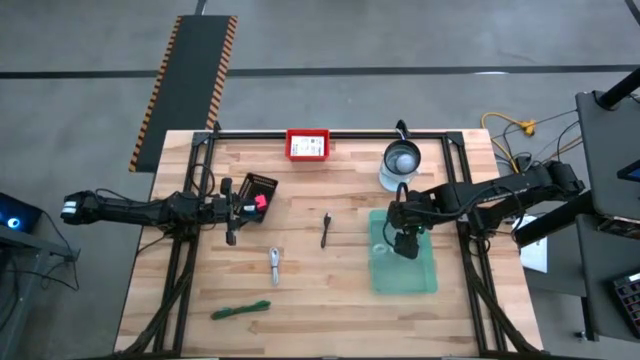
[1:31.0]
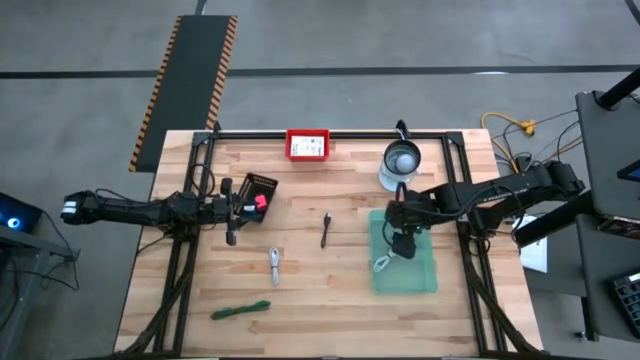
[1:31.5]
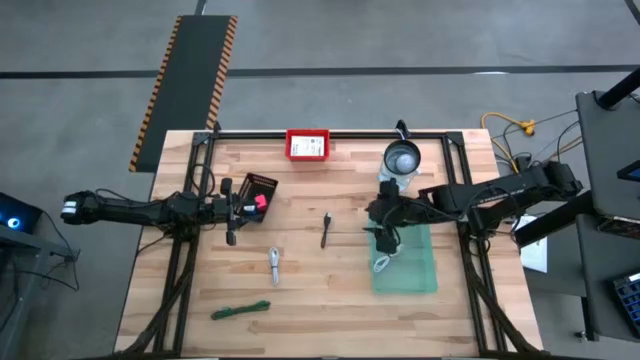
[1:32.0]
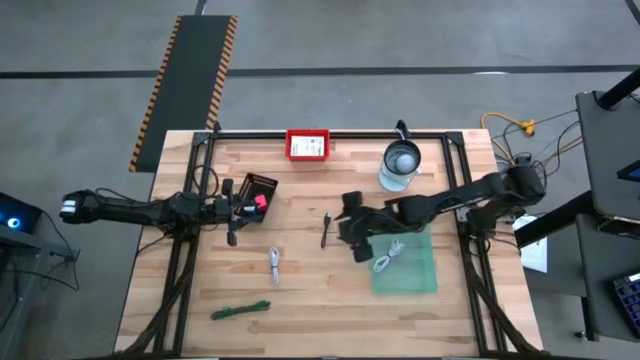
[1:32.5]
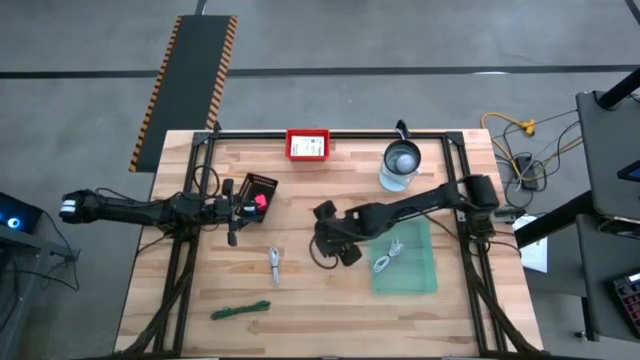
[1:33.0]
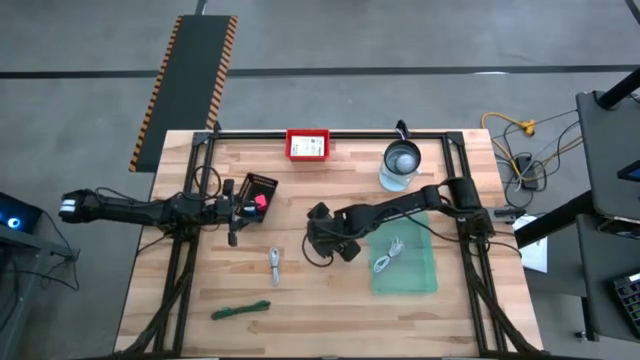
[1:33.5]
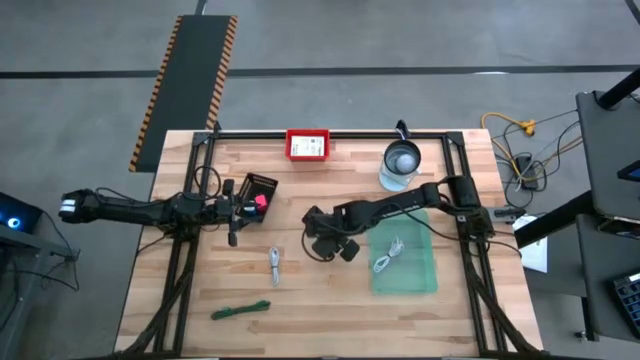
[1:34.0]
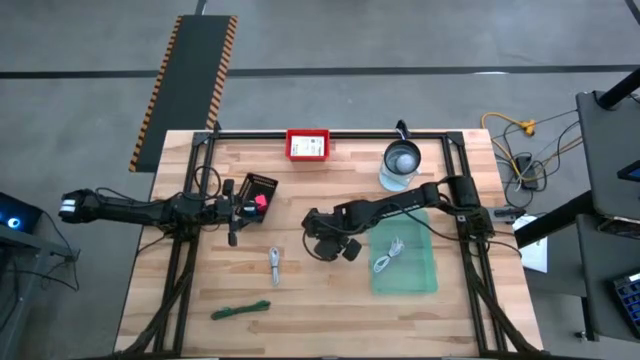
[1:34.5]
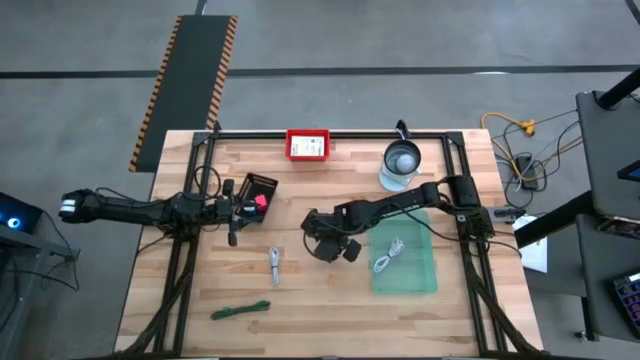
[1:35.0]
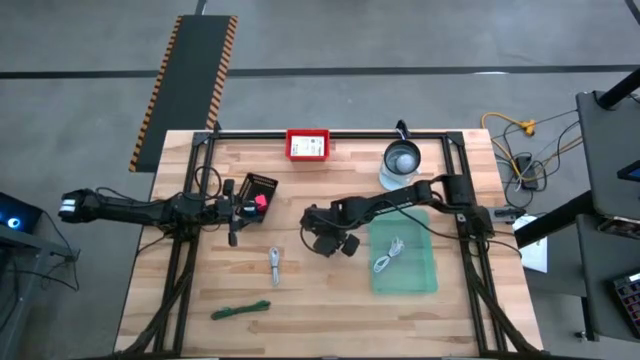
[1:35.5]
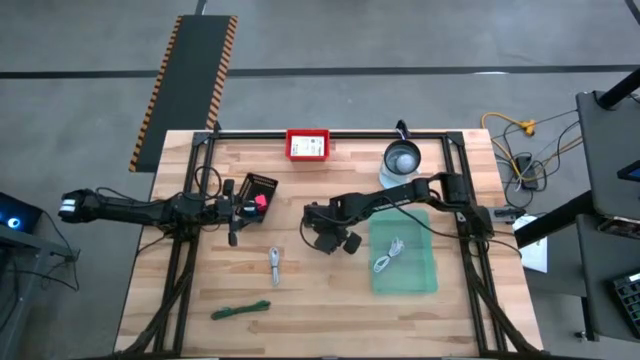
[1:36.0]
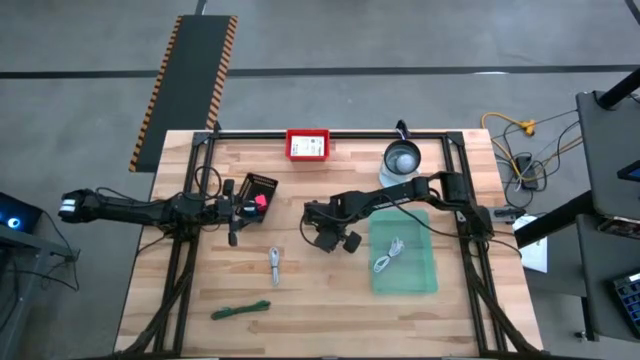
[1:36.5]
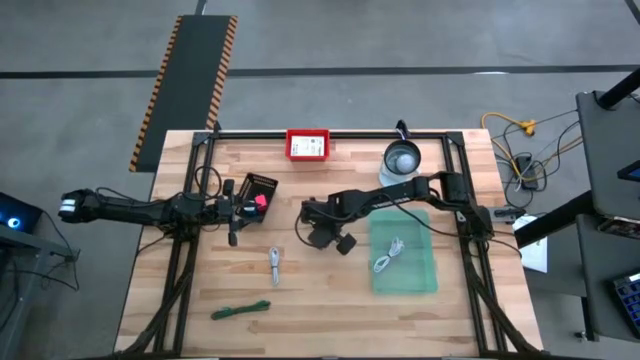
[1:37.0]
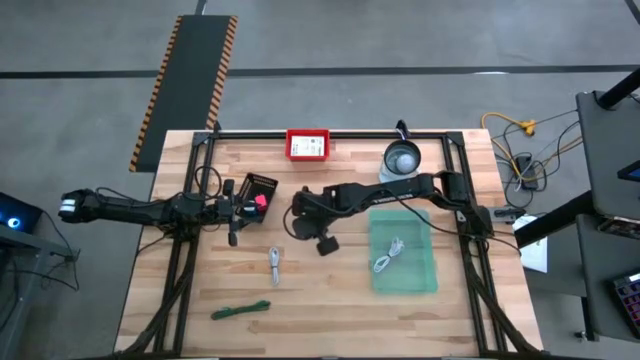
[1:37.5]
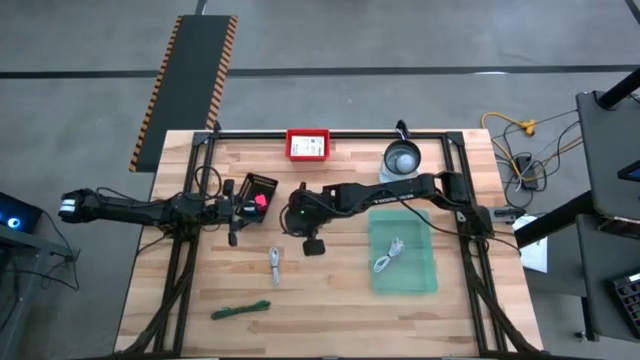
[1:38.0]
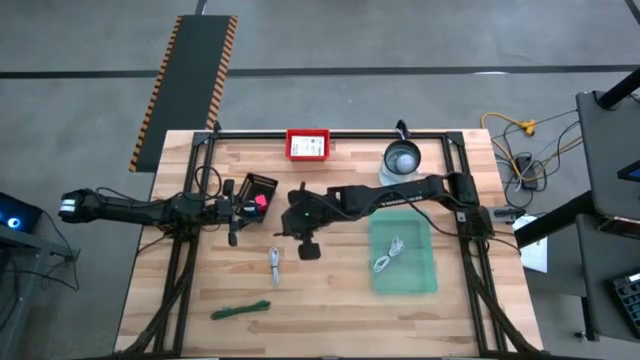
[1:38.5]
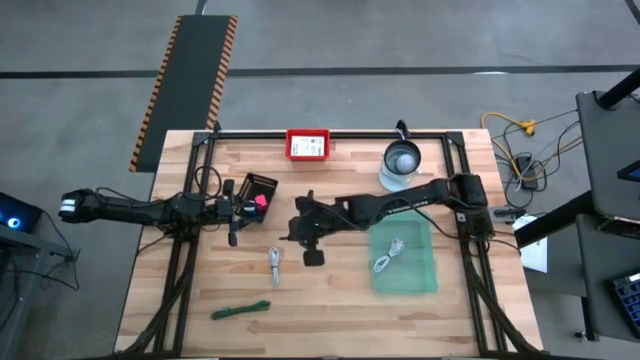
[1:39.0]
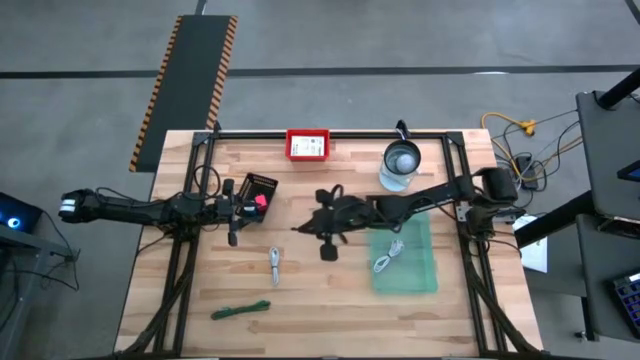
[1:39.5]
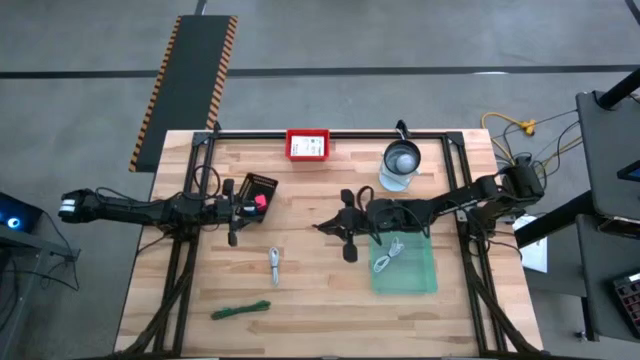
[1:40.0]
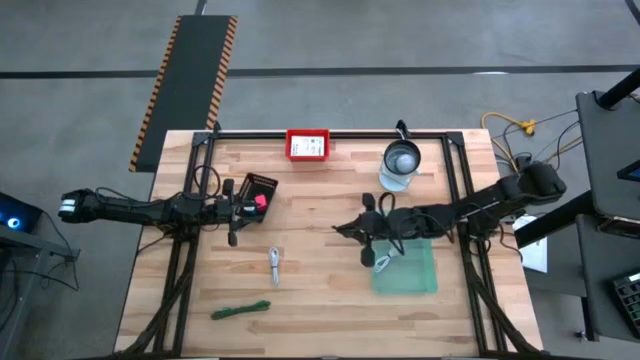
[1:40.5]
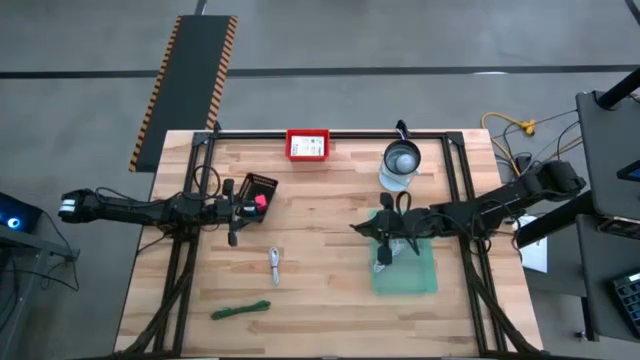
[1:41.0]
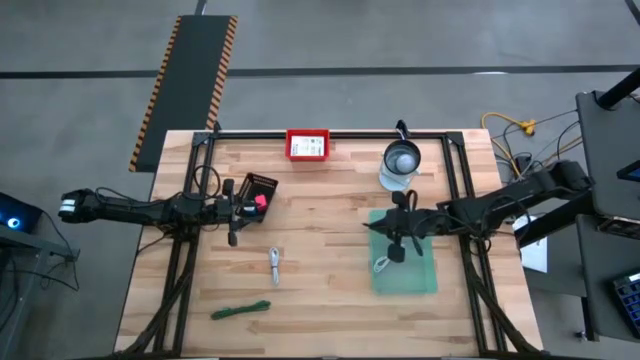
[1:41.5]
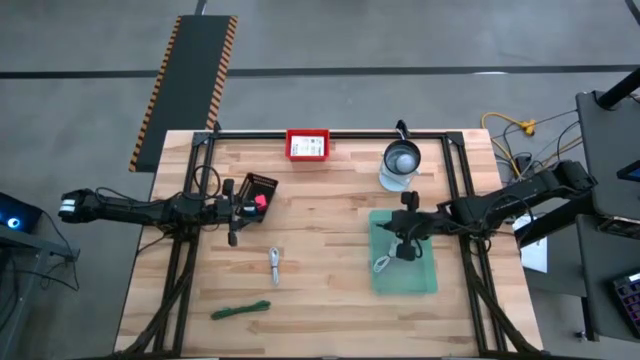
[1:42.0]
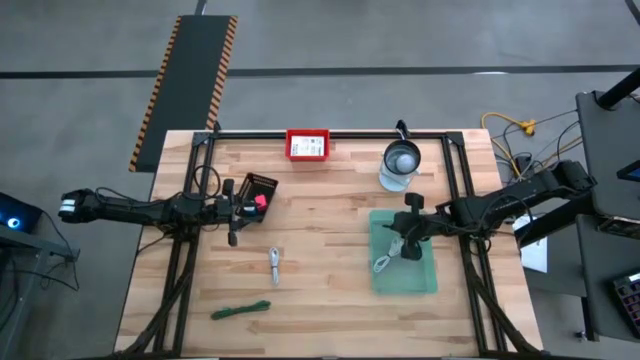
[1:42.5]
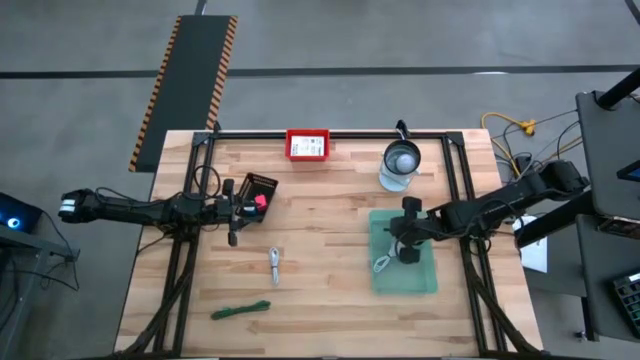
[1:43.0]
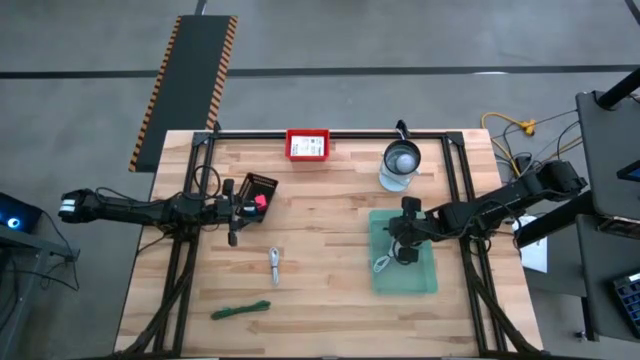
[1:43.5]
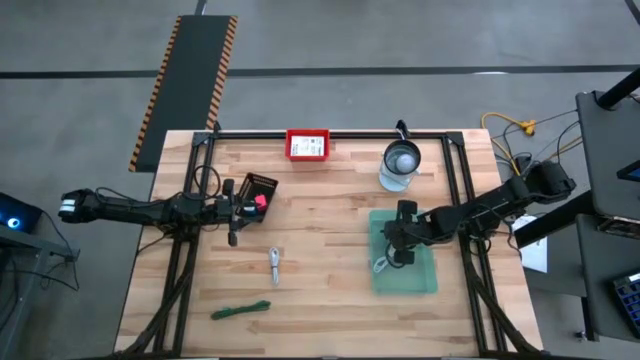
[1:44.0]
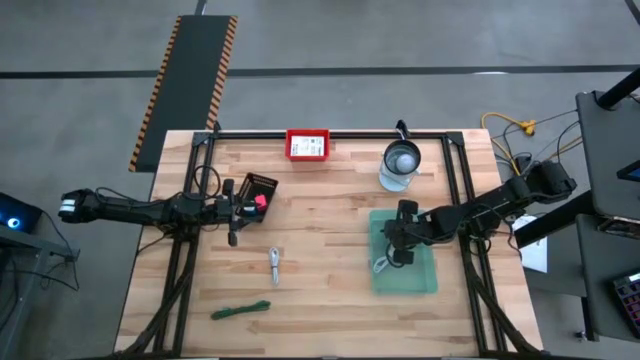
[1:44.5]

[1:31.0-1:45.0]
Task: Pick and place items into bin
Put the black charger cable into the green bin

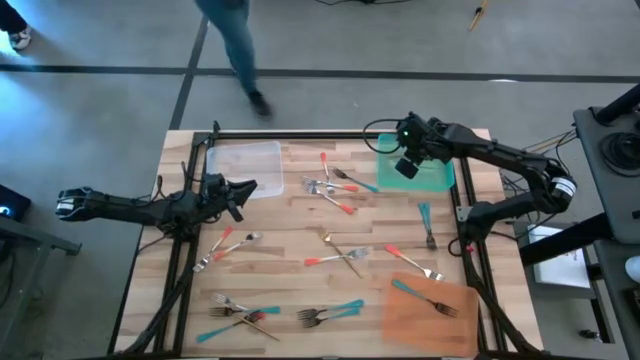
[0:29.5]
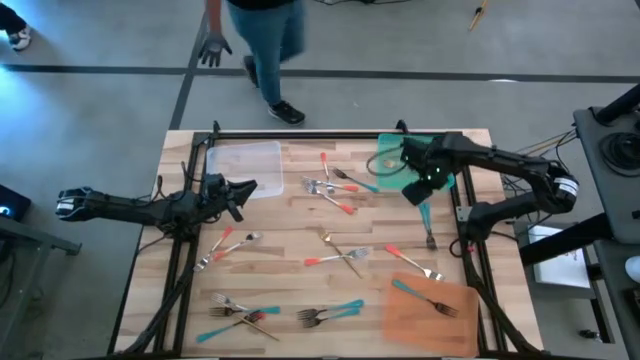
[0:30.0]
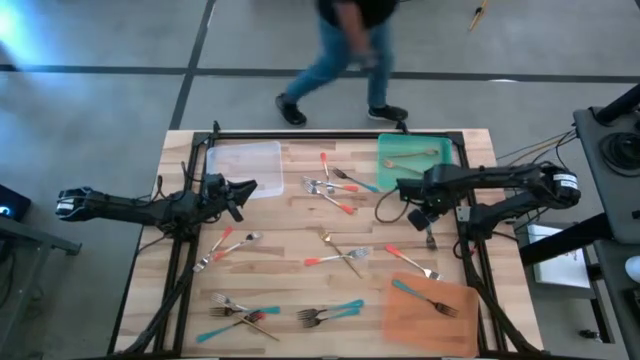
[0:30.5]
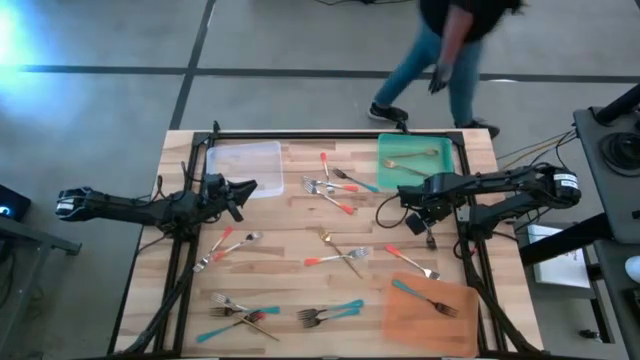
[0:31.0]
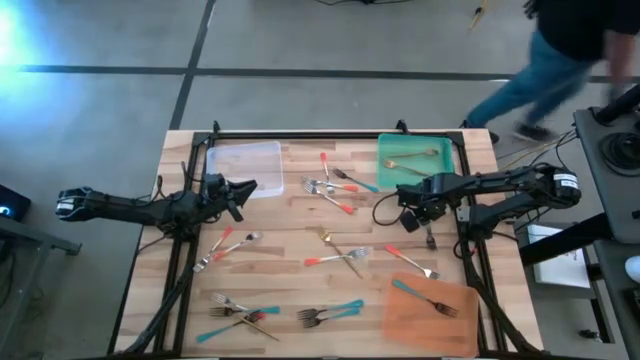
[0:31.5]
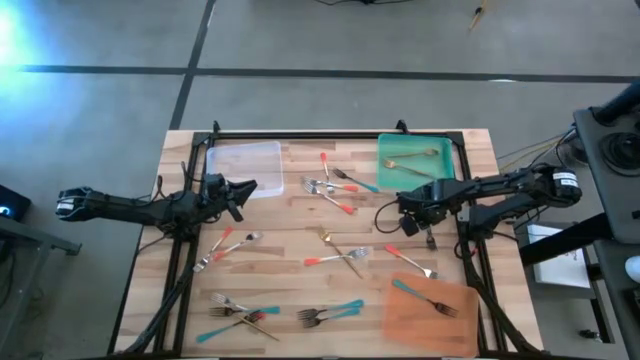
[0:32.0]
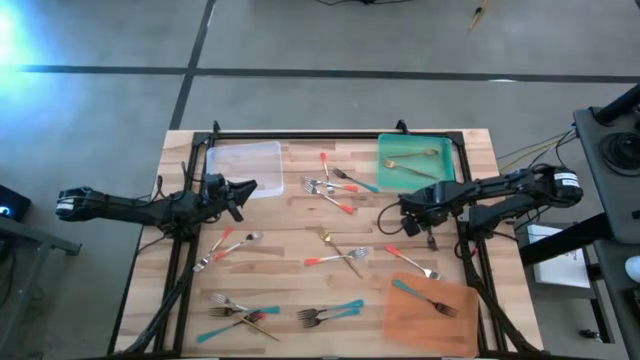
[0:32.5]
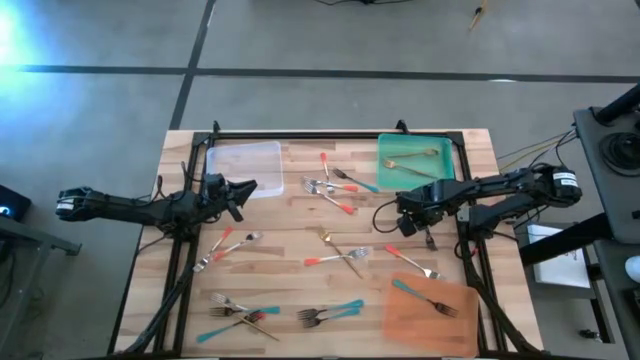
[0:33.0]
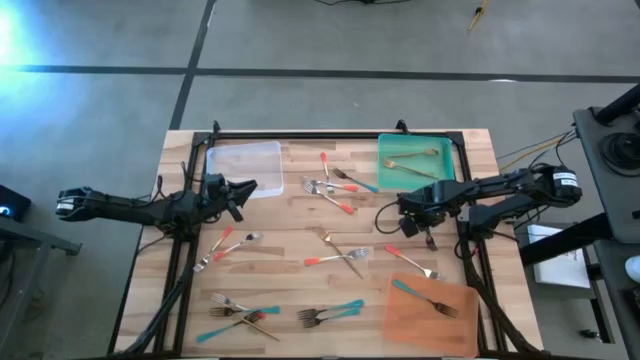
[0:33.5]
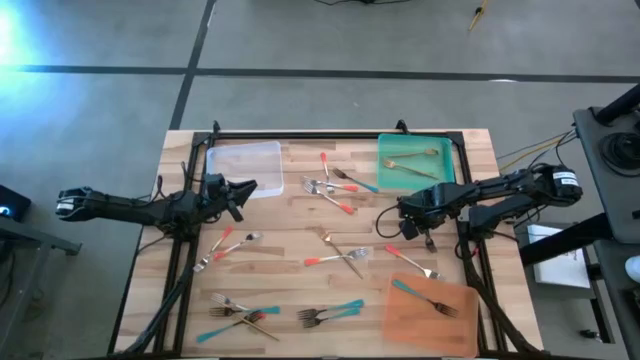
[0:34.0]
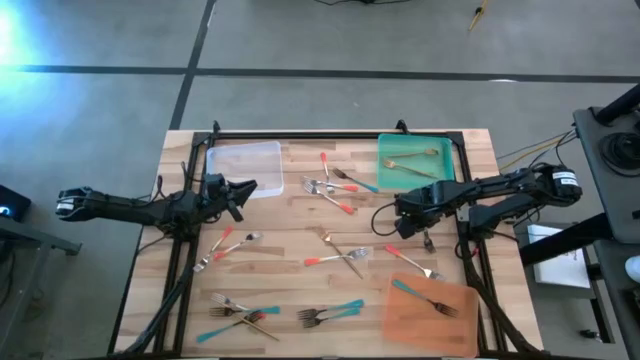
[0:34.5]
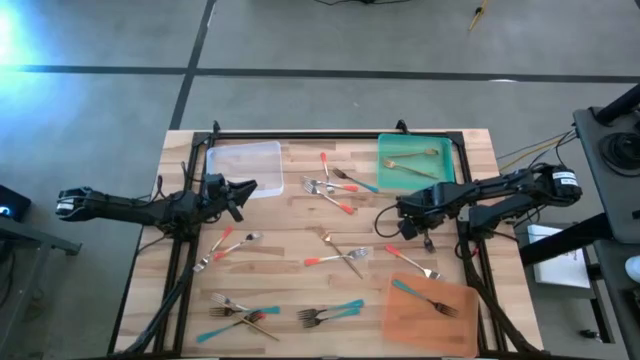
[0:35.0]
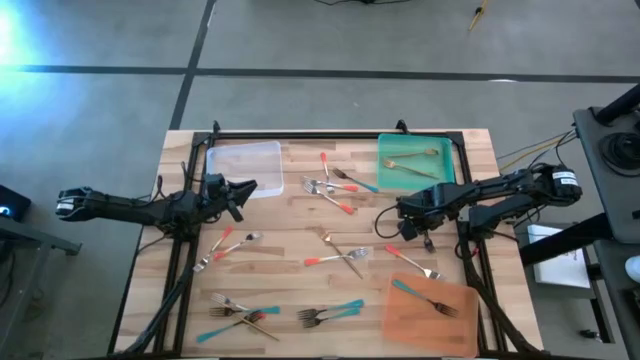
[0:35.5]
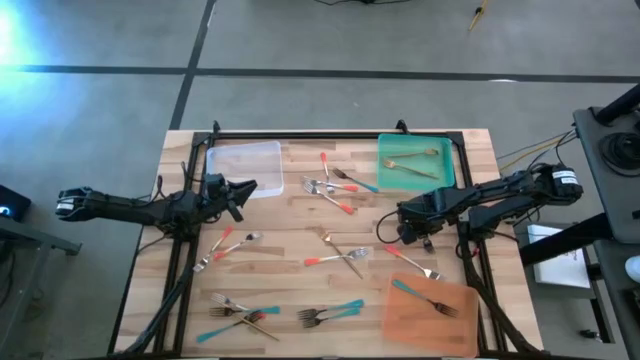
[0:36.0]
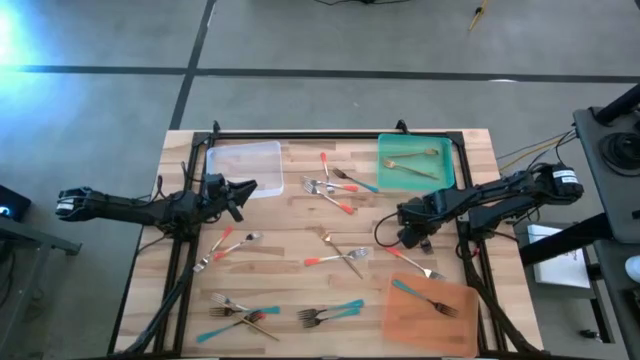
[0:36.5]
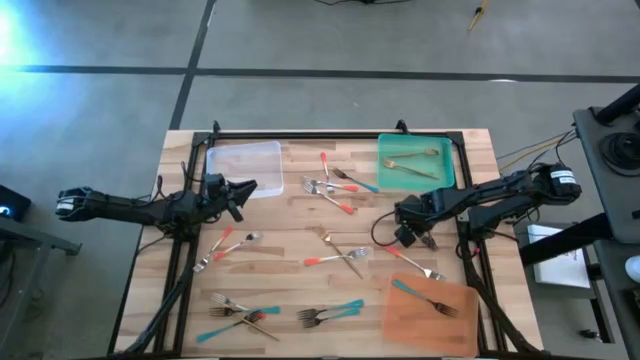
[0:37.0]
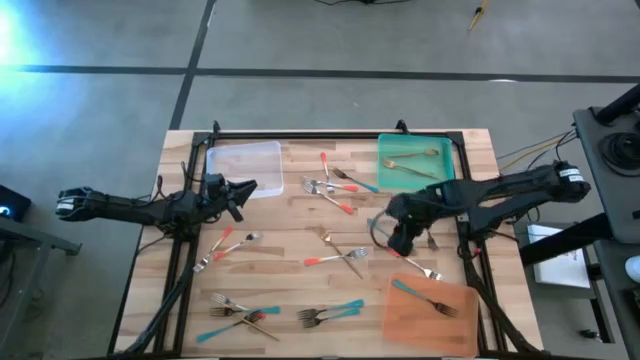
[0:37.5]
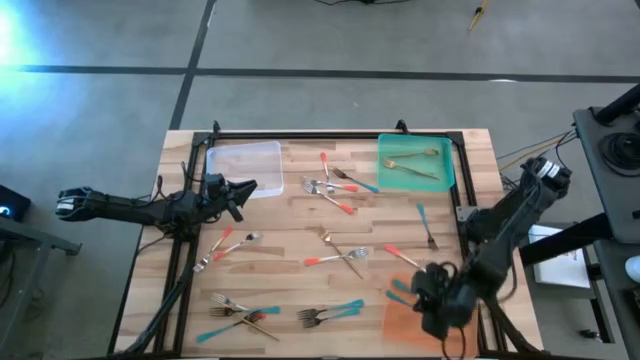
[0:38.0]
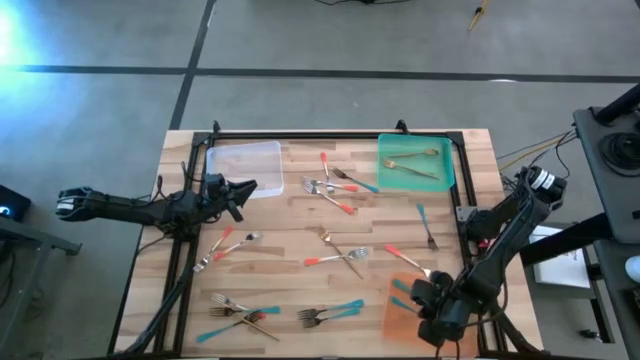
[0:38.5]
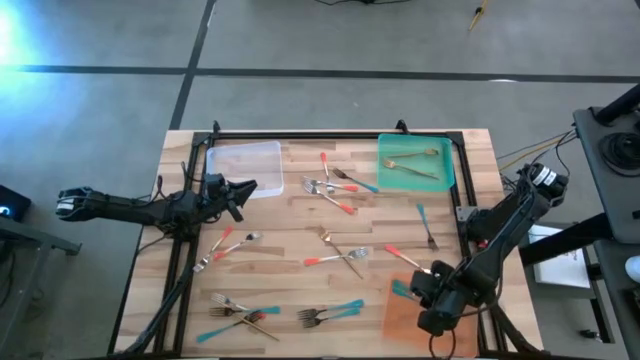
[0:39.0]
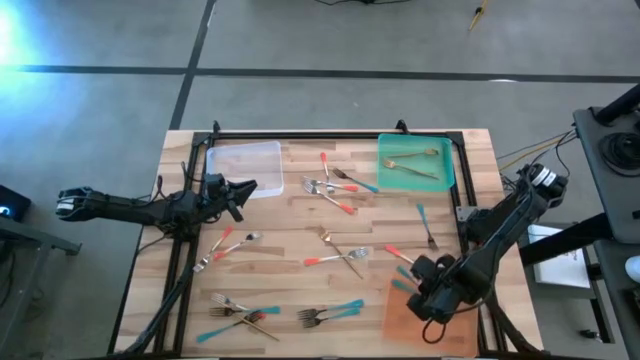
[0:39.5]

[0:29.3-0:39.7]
Task: Sort silverware by color (type)
Put the blue fork into the orange bin
